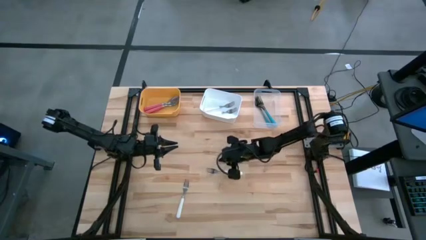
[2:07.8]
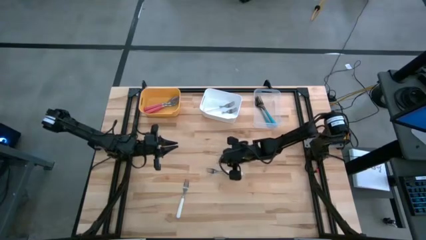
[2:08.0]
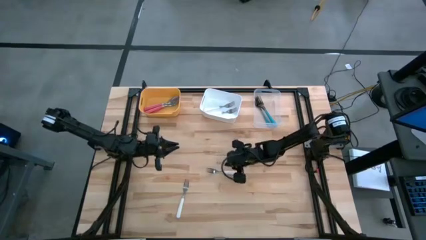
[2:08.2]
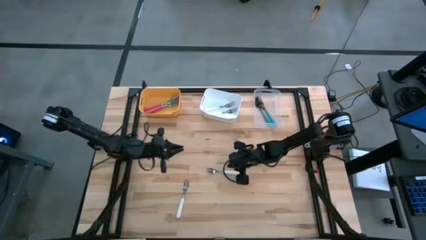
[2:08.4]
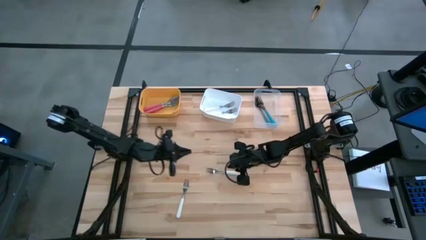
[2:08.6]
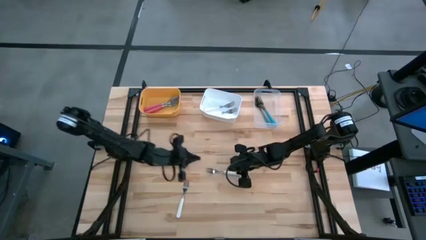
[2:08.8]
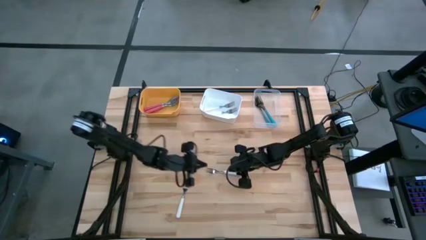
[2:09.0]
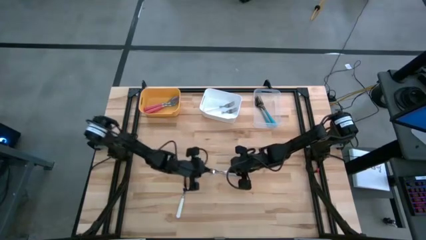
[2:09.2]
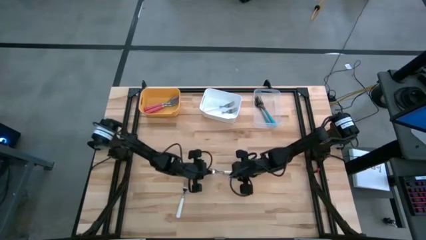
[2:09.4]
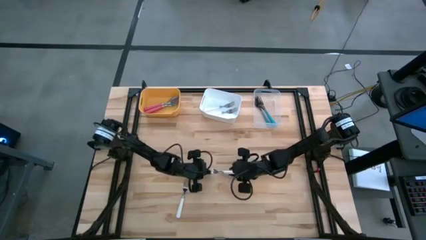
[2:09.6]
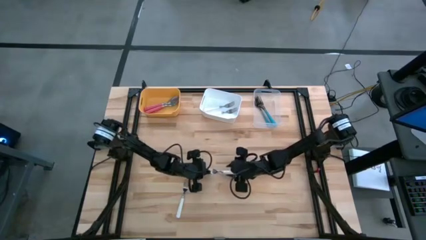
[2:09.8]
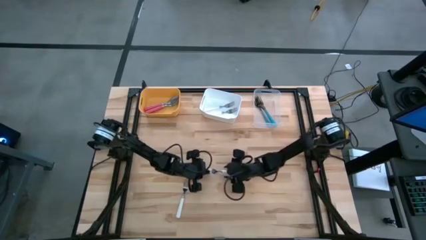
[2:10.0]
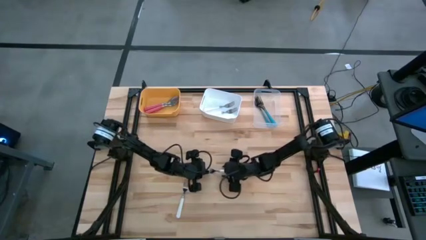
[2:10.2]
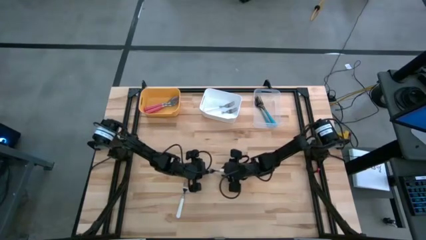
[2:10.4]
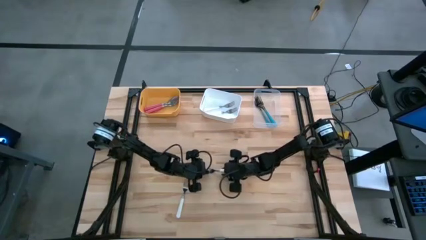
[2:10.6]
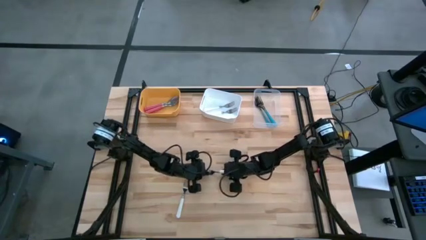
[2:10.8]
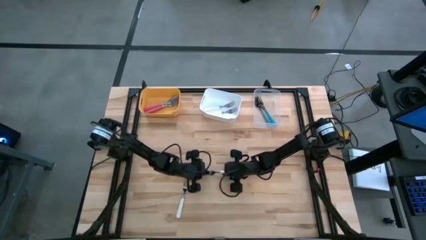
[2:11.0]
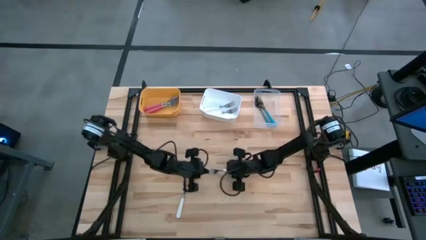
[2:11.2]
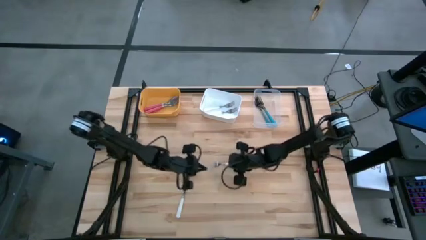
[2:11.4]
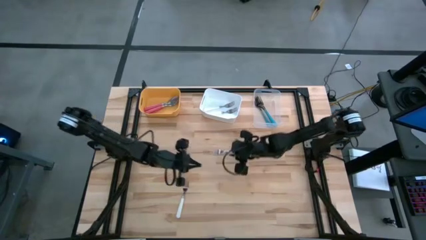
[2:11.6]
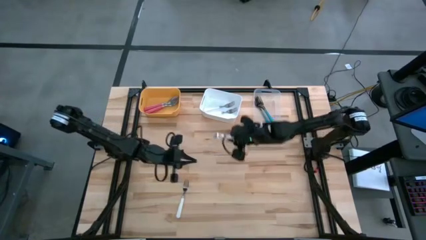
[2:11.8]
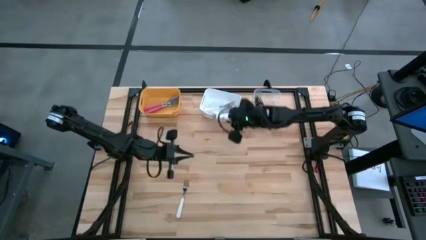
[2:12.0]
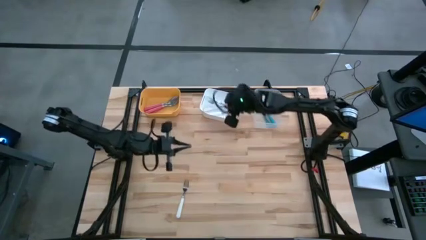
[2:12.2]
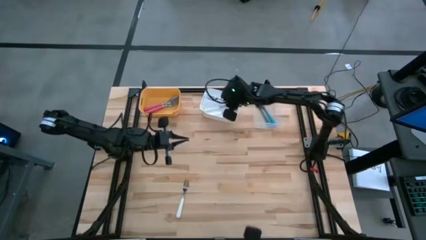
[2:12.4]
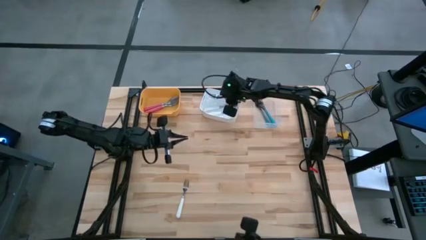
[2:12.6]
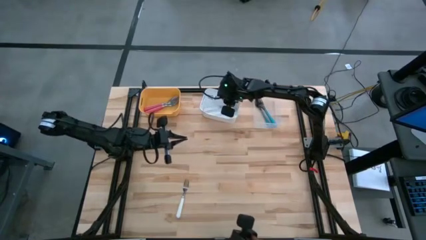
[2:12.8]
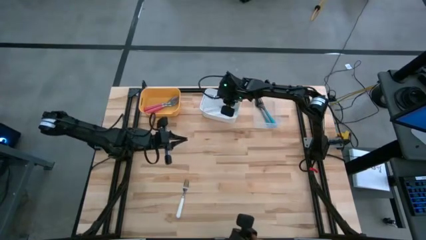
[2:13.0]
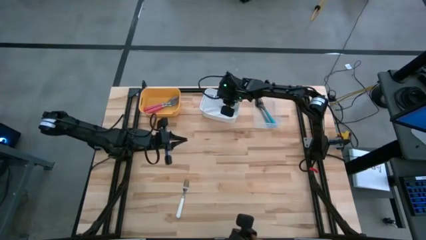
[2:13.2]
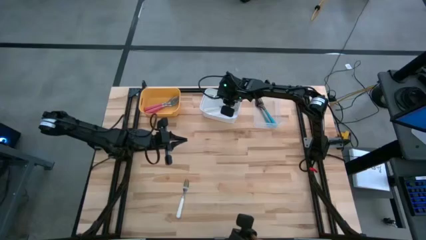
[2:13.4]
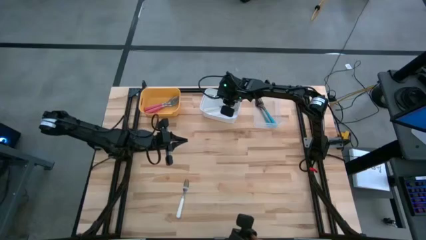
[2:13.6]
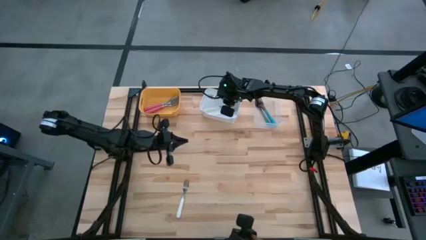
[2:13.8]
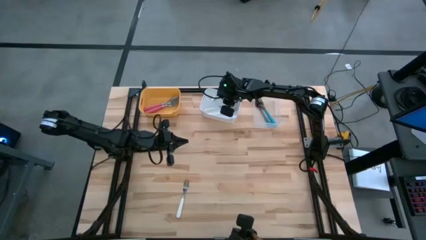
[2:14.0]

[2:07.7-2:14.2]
Task: Sort silverware by color (type)
Put the white fork into the white bin

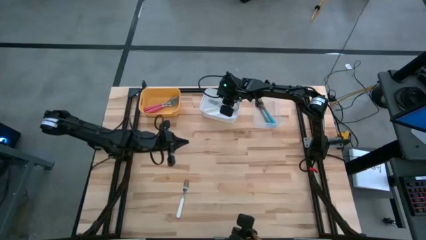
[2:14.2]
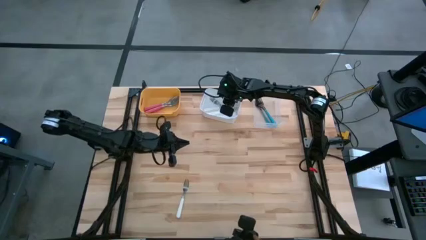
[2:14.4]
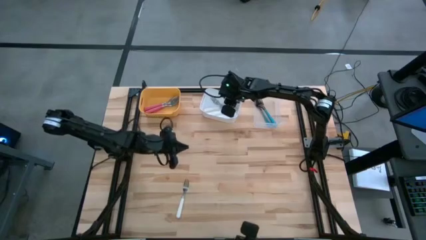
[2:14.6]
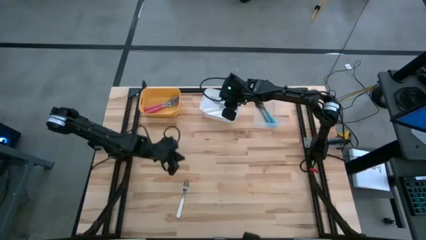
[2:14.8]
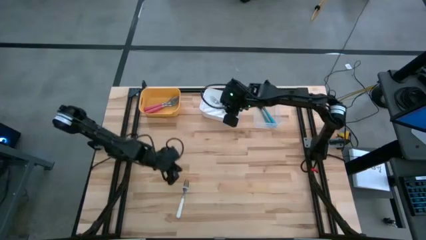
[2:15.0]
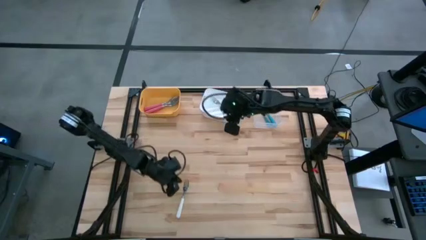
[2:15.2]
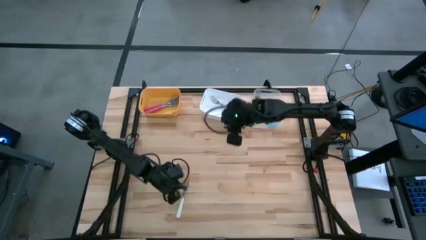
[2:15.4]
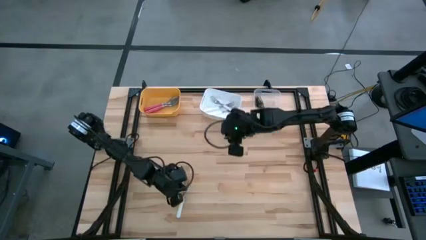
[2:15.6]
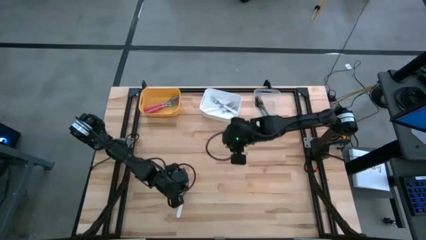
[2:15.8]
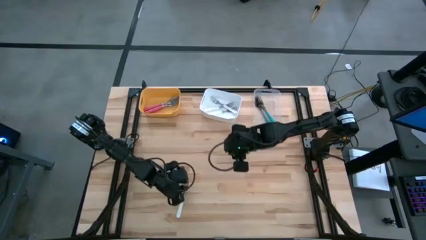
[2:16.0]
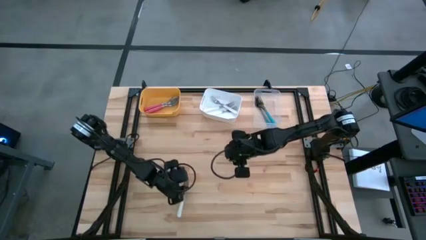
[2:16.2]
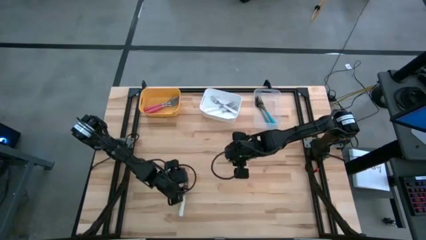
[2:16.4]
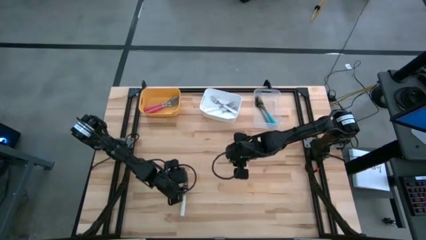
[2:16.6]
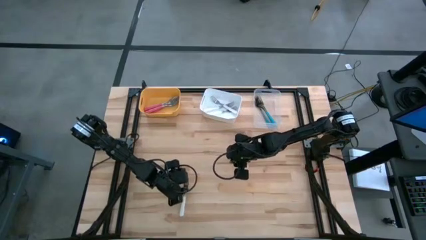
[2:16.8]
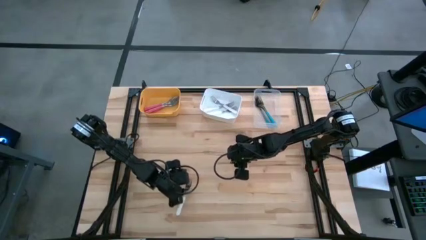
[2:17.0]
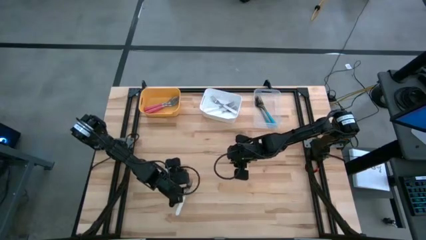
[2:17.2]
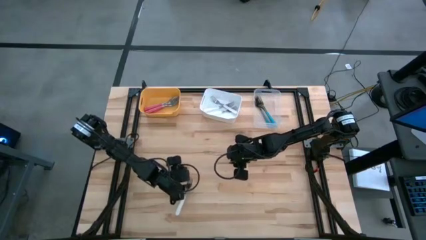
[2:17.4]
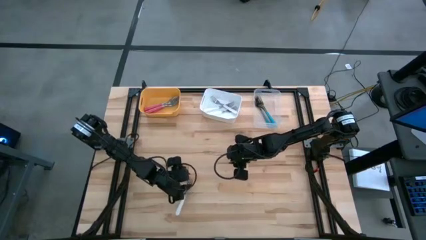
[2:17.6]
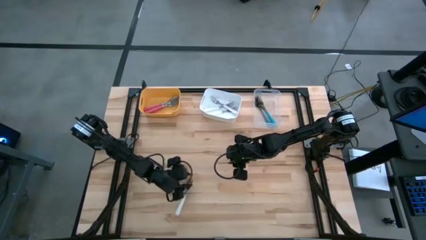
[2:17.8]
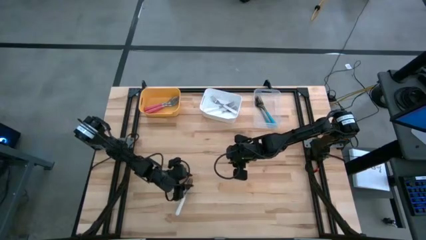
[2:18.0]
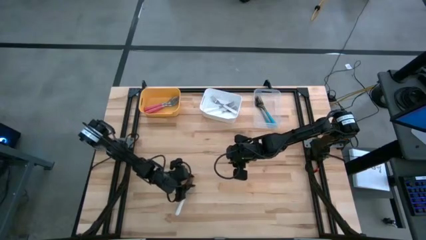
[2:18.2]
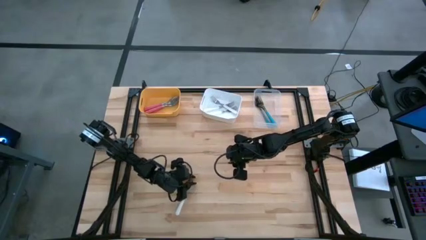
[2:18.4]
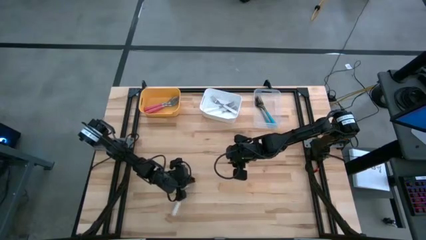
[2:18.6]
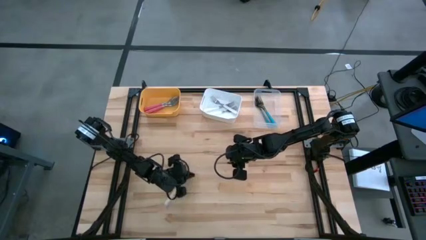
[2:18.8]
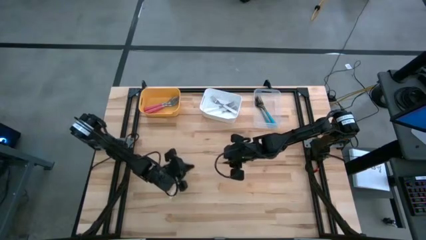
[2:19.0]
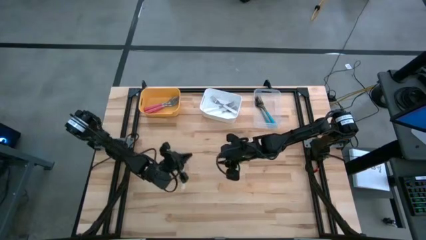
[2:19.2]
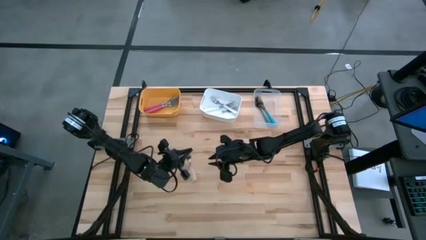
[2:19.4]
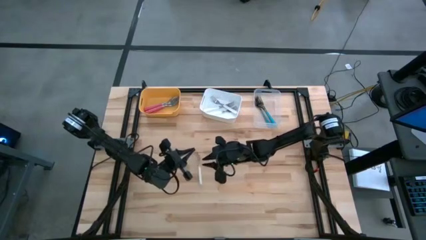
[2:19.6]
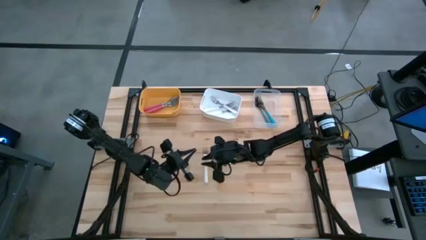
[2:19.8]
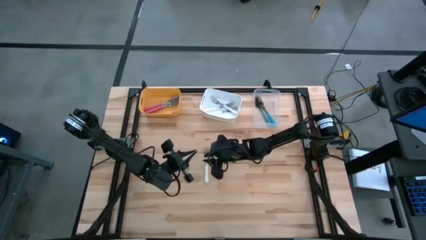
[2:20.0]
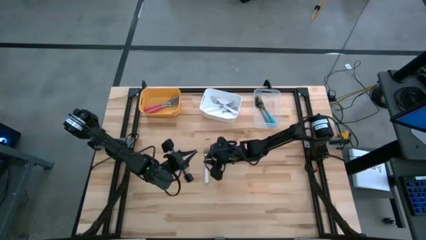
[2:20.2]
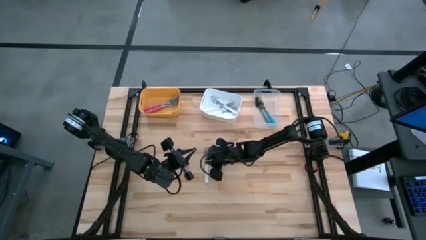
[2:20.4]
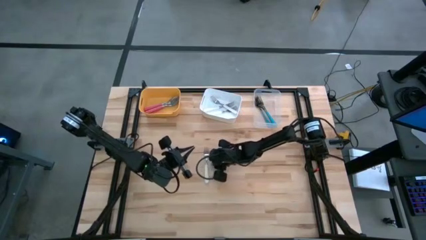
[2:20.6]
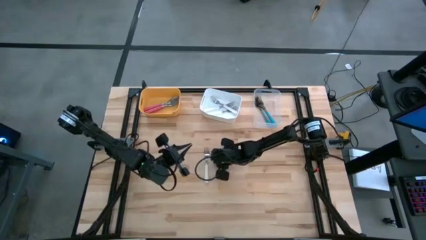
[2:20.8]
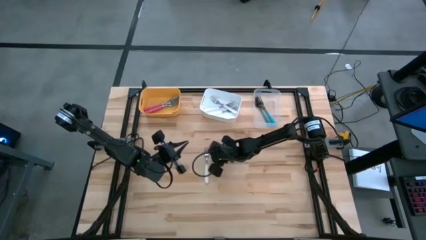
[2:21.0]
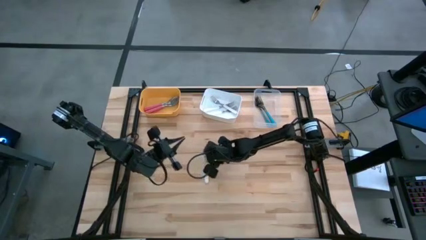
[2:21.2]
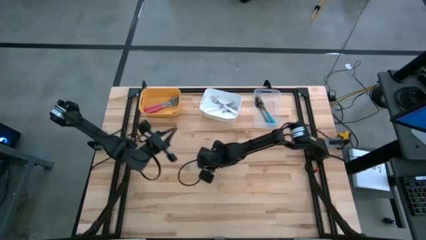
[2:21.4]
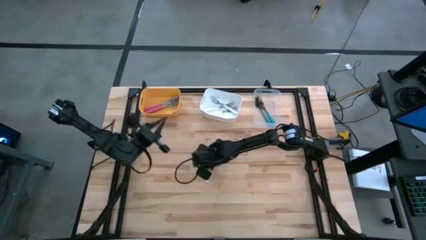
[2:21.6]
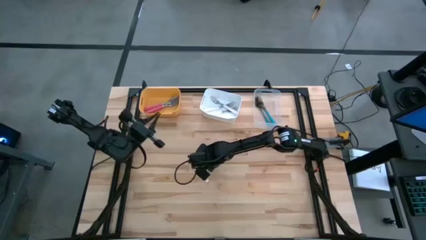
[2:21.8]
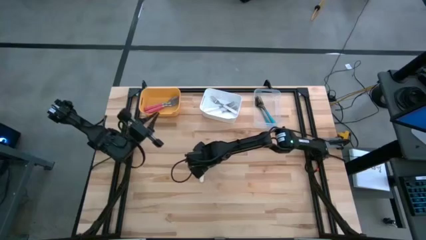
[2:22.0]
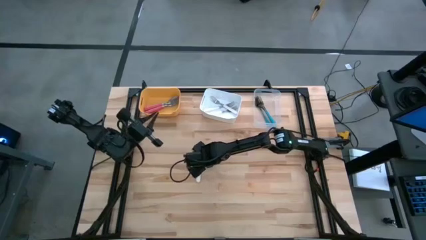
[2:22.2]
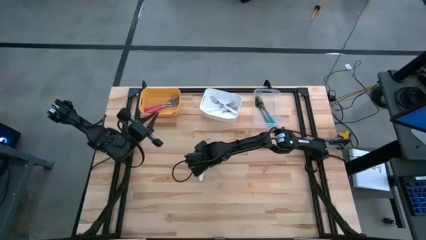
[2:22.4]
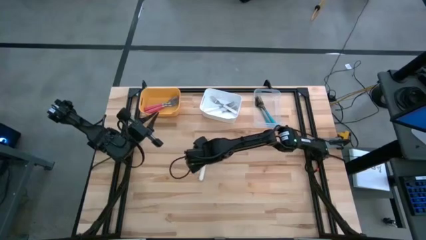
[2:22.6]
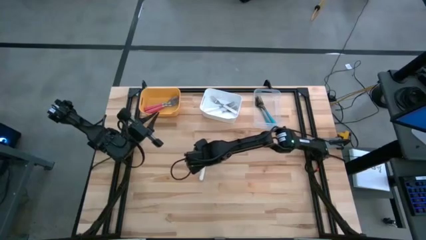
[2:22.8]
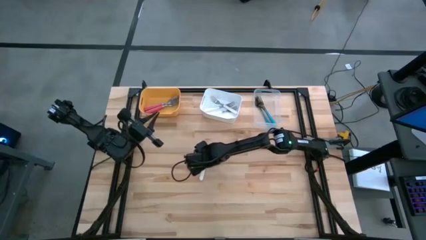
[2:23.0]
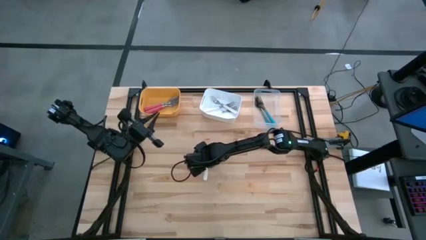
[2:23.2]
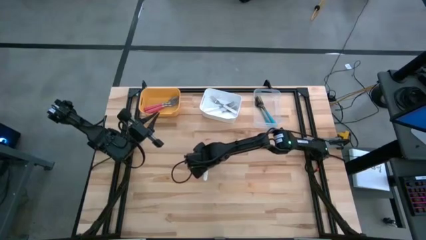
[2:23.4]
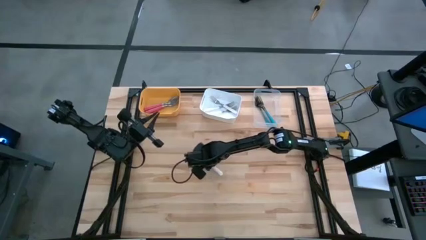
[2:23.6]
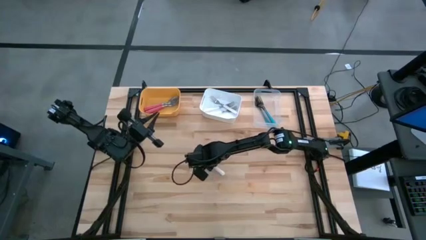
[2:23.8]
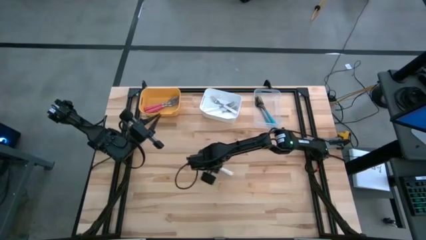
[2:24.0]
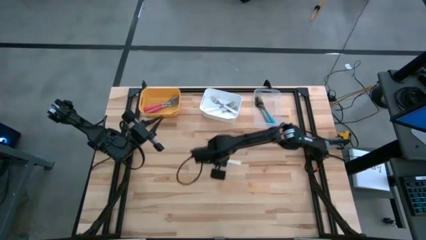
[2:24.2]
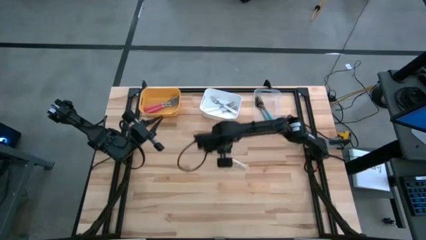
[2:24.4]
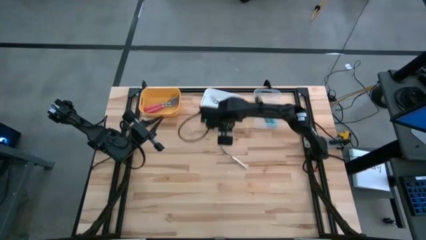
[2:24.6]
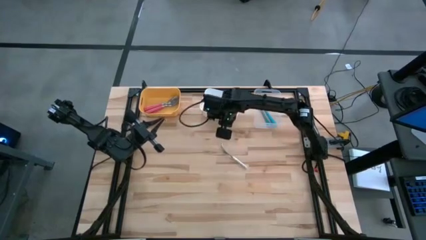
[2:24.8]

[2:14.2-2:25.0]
Put the white fork into the white bin
